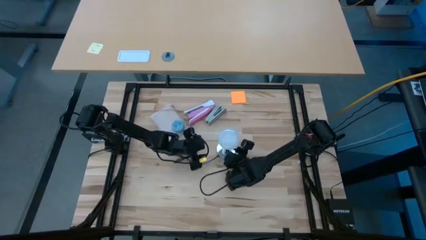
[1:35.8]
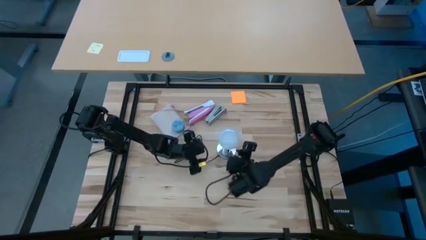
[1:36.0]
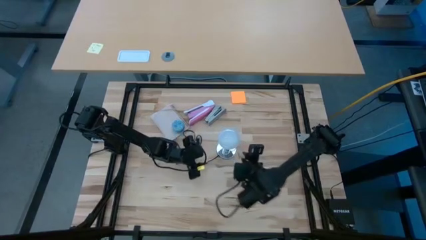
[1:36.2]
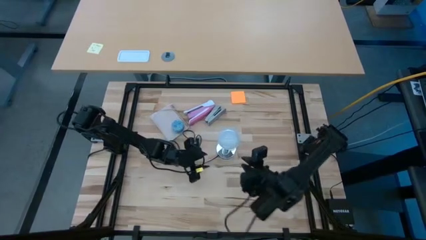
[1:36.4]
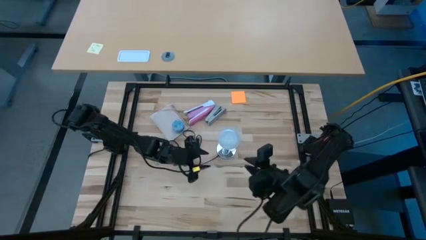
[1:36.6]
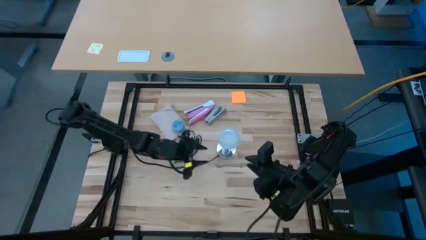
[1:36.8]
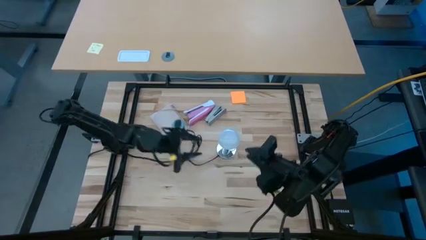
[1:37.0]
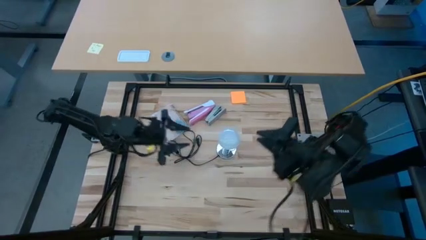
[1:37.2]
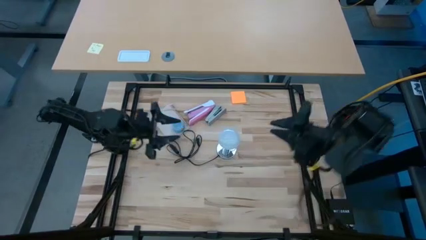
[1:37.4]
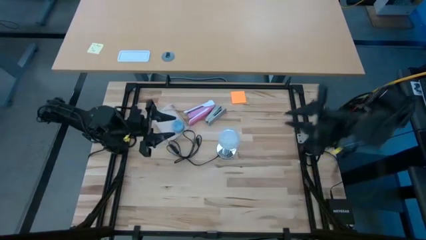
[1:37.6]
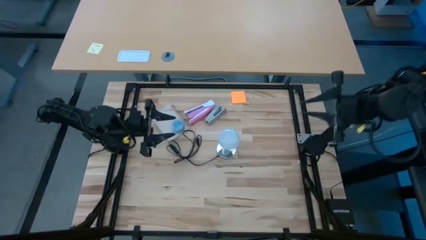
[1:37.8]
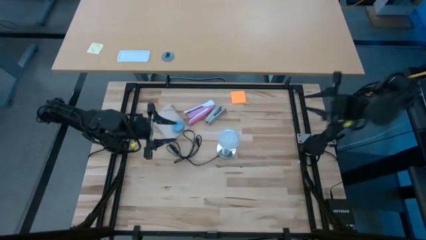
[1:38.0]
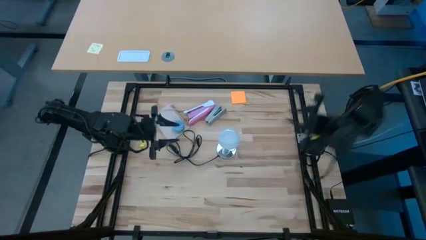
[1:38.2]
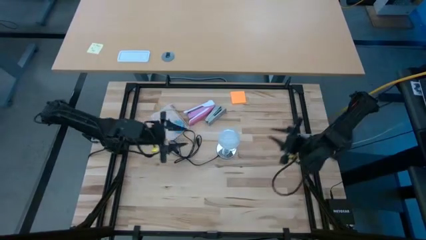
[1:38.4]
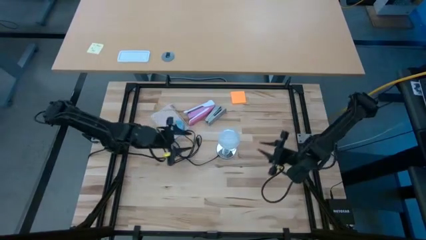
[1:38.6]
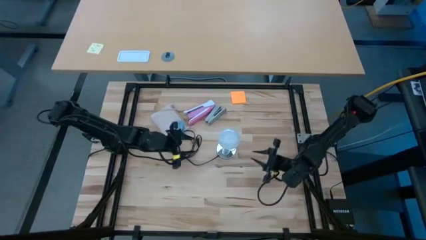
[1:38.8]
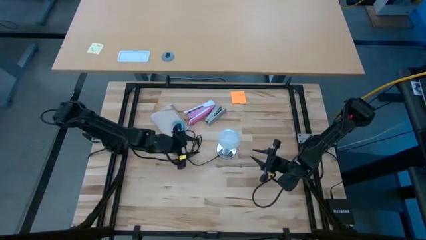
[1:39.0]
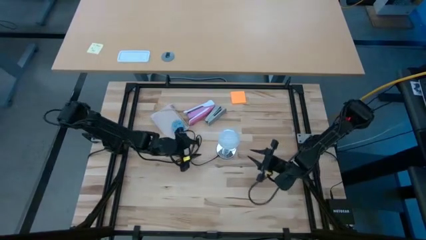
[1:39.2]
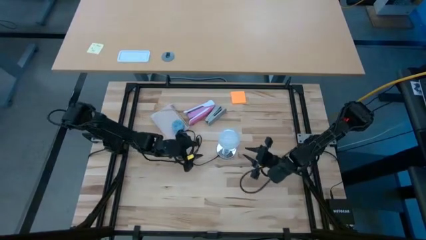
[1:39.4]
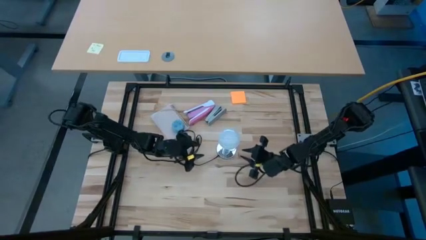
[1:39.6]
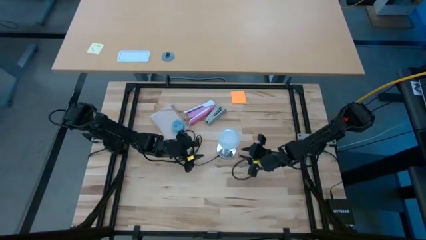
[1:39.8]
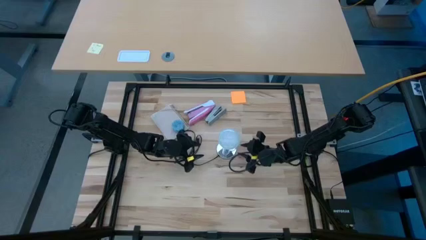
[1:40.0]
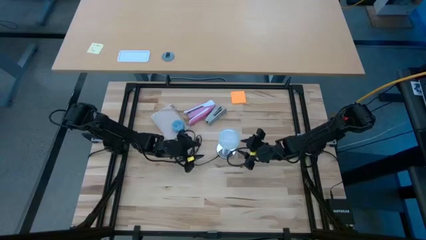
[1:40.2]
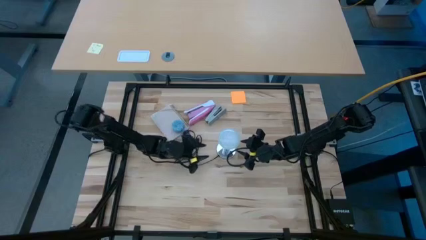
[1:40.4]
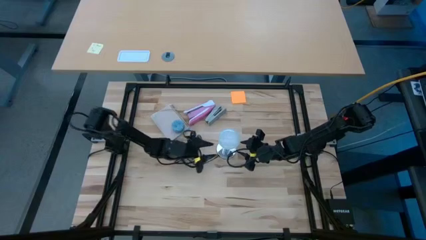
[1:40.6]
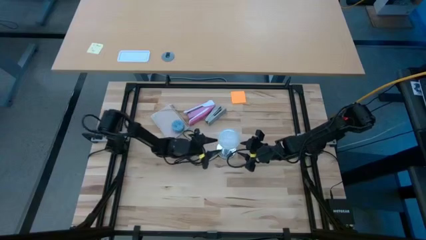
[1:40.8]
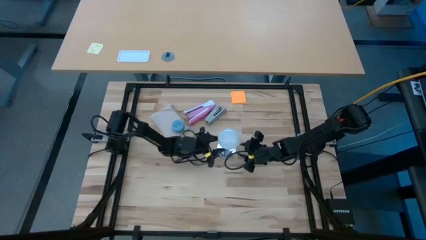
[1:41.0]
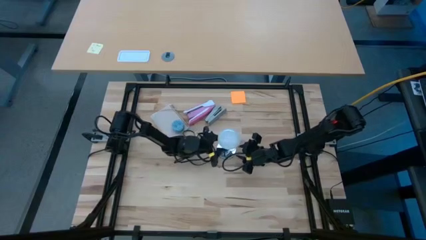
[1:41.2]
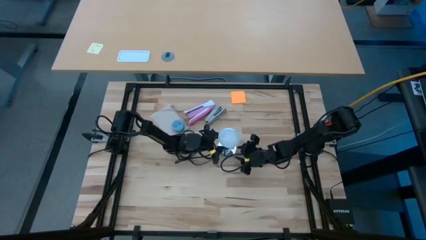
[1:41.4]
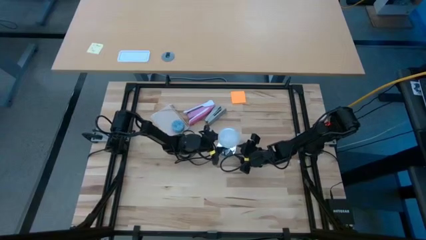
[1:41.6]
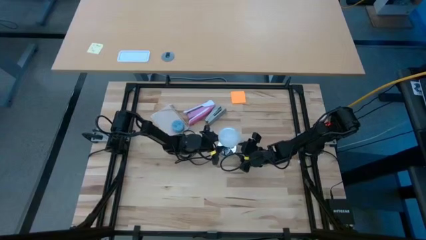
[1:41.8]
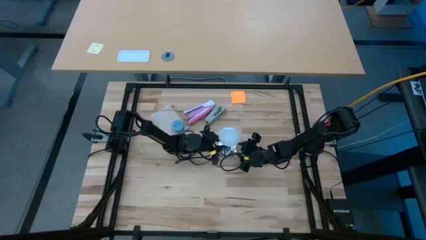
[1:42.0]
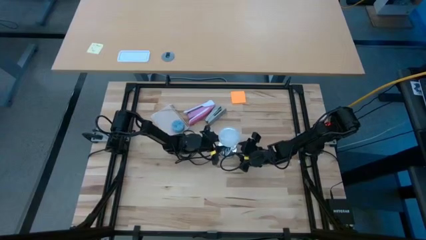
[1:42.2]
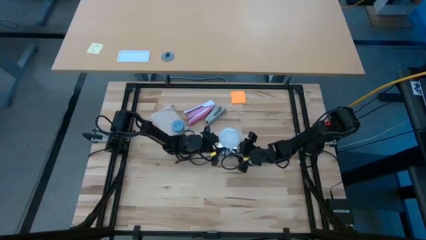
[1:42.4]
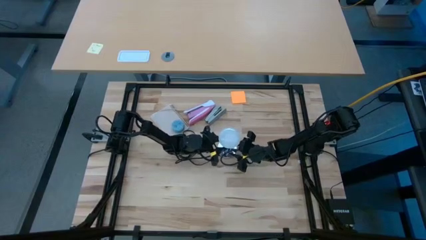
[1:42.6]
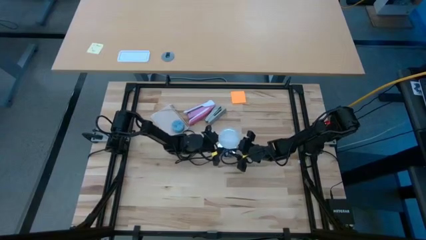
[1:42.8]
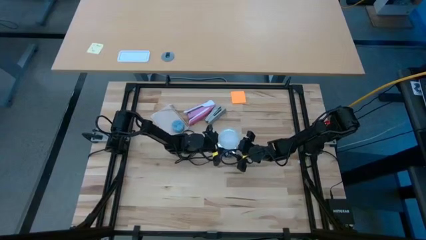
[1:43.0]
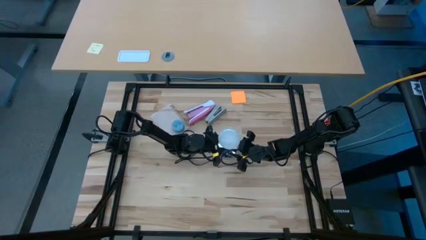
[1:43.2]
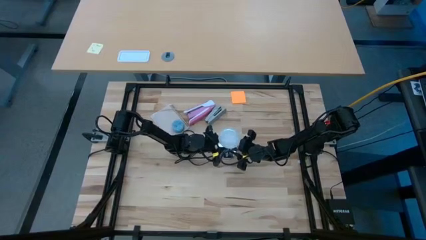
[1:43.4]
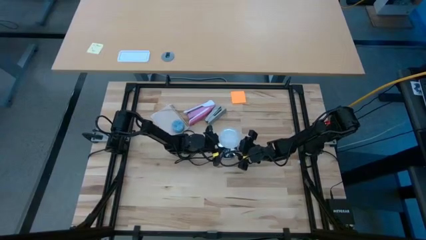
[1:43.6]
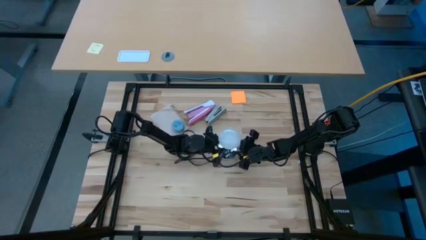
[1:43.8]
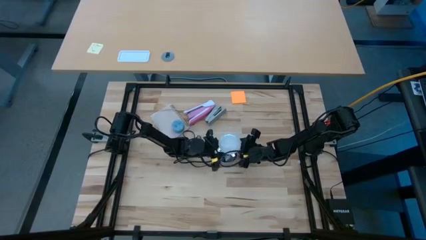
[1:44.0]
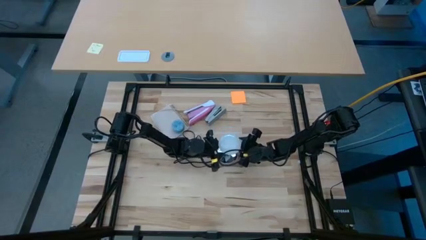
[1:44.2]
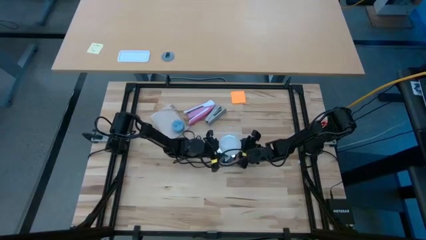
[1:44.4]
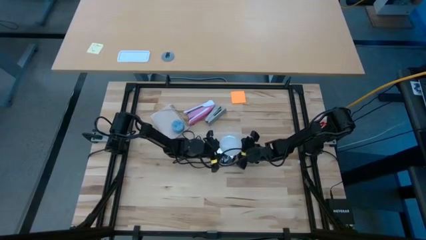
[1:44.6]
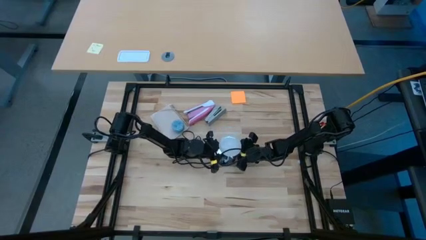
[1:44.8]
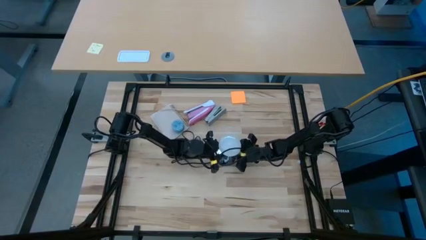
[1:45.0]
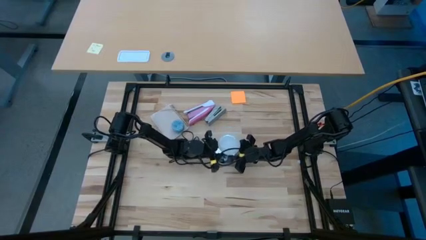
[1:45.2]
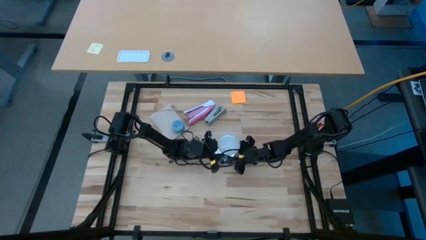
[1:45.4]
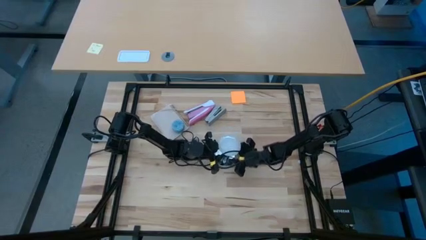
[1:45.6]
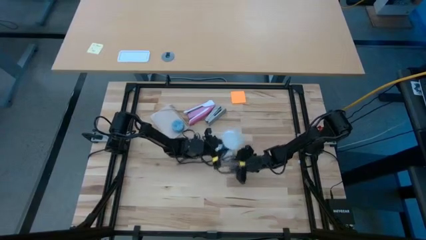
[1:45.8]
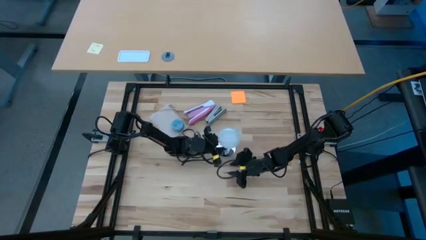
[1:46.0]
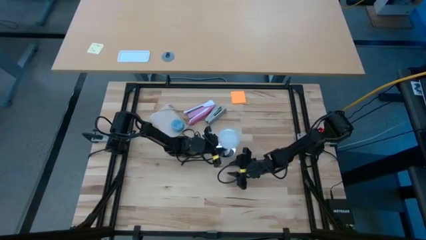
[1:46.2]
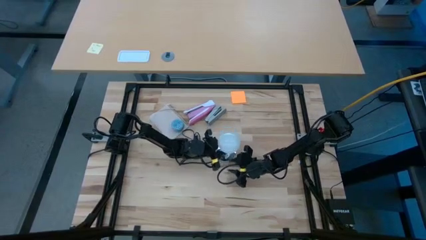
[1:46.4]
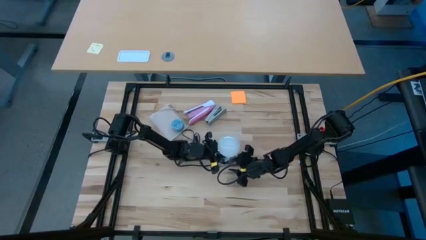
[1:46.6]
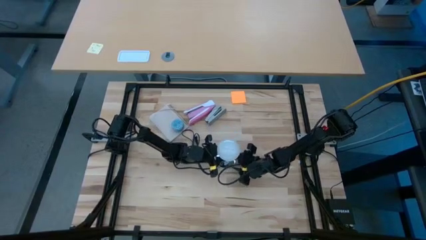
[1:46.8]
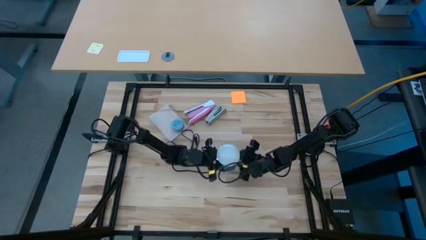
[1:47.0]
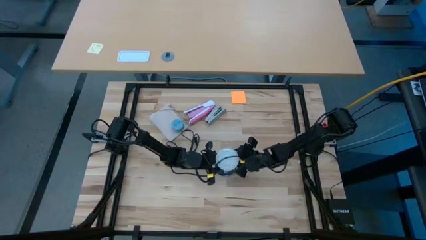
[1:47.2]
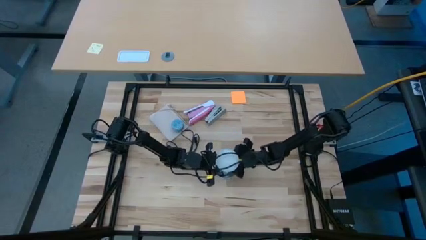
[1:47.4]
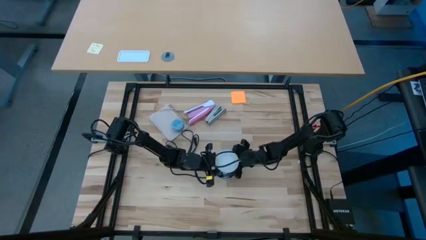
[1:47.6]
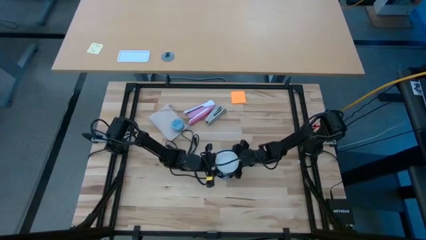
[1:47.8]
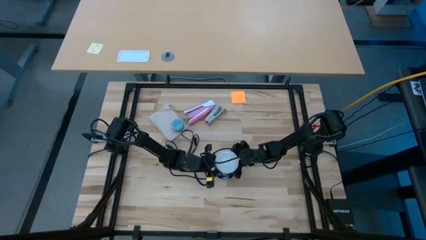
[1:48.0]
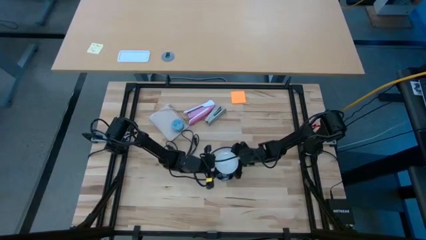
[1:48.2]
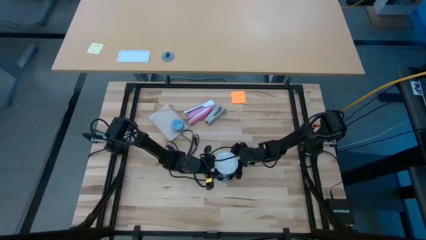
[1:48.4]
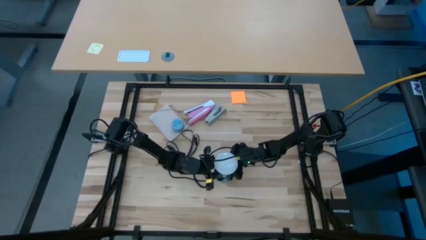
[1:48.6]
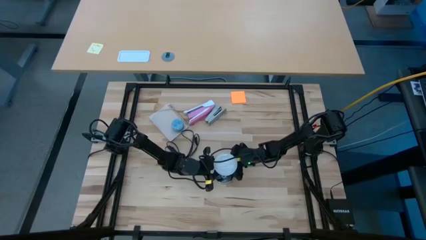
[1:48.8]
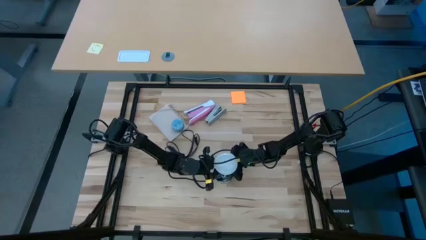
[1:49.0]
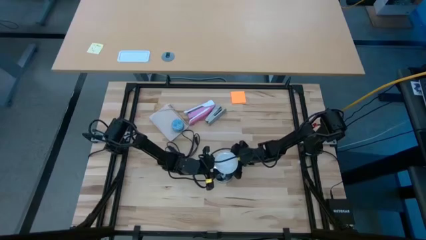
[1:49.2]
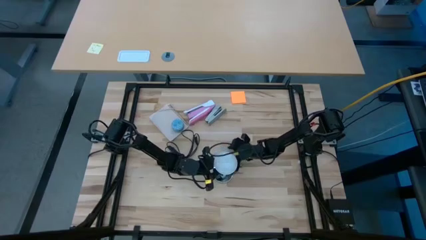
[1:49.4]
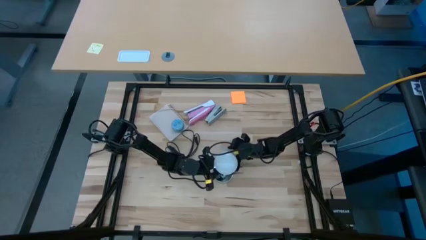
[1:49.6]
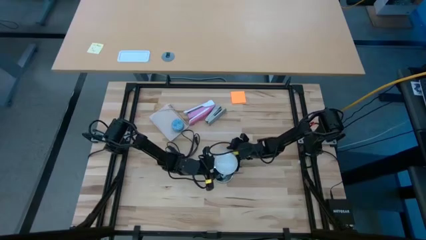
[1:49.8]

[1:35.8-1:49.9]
Task: Screw lightbulb
Remove the white lightbulb from the silver desk lamp

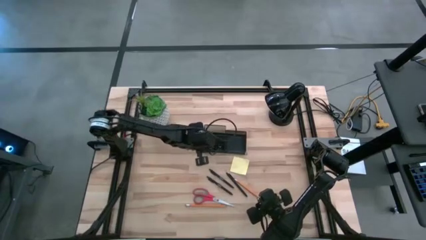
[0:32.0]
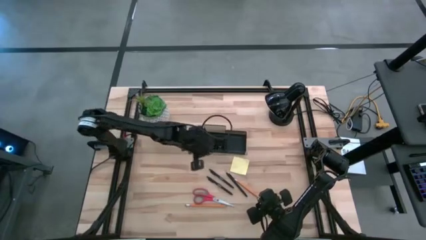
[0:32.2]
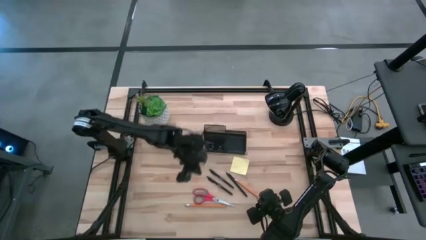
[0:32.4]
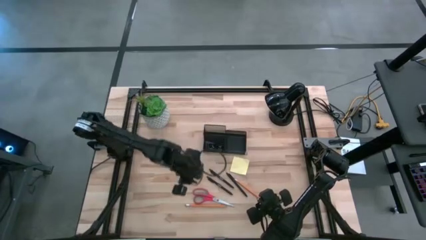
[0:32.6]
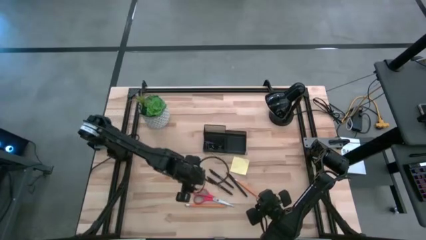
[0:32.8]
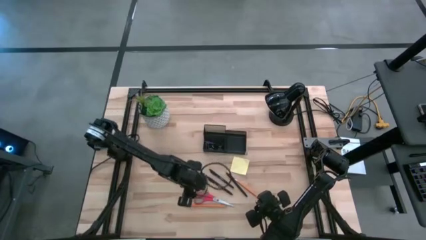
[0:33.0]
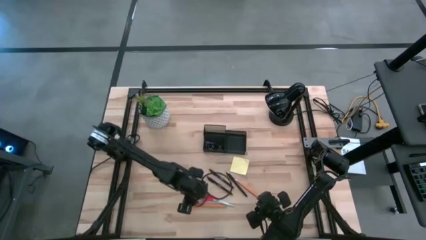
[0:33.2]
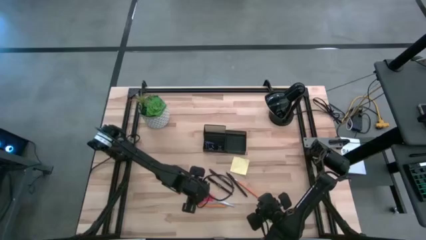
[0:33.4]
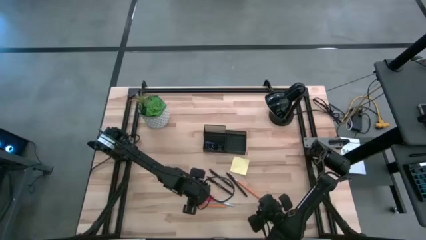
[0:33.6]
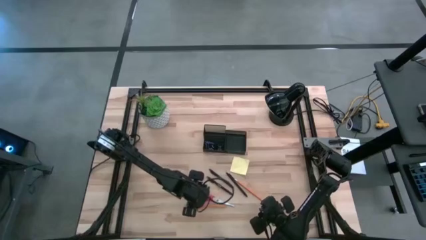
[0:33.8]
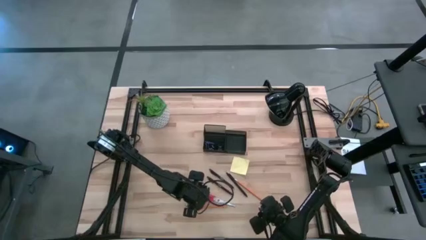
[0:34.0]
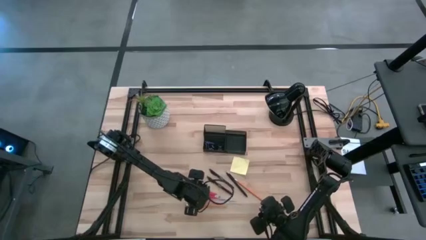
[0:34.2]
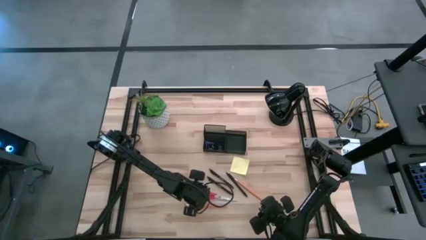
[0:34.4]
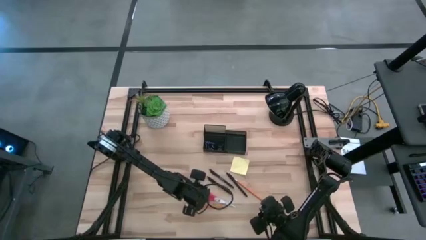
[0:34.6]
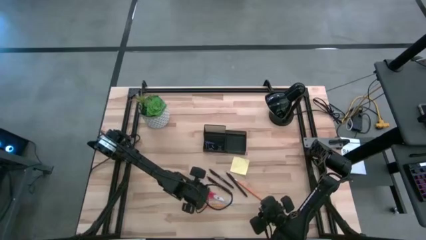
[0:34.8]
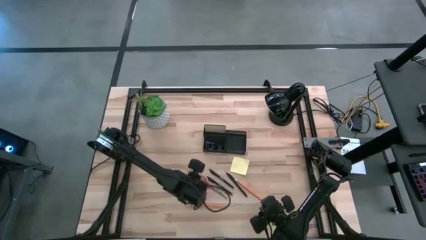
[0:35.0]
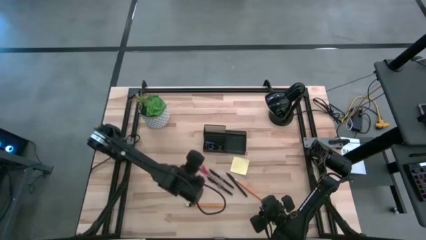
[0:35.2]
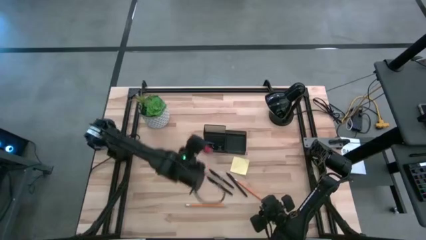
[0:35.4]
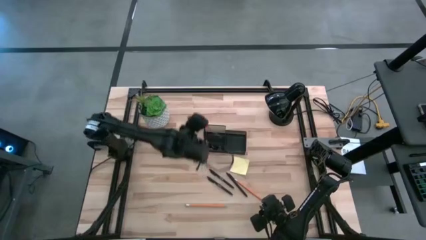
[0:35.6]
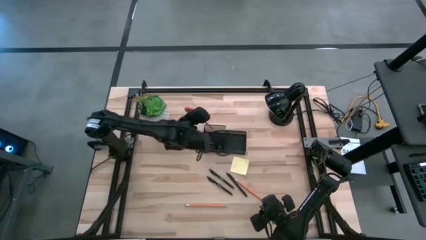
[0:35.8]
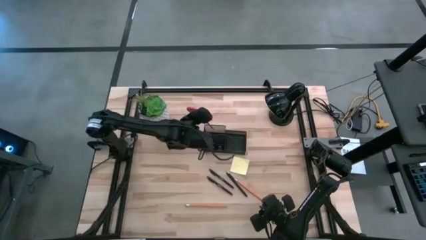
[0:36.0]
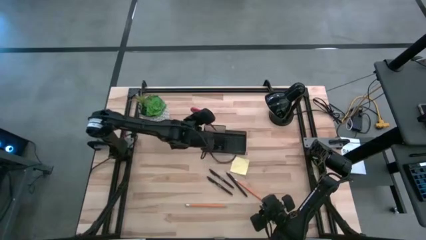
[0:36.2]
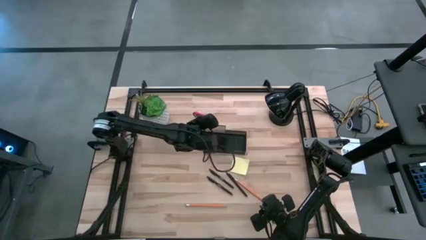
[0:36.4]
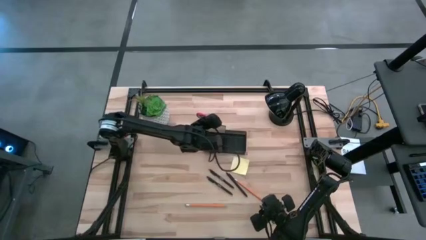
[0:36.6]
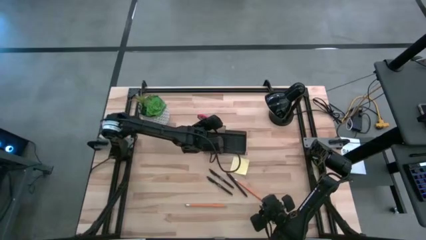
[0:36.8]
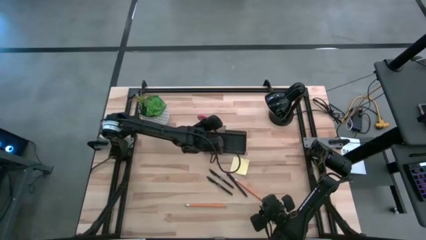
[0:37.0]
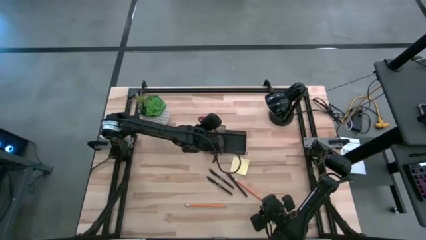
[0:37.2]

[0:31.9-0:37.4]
Task: Pick and place office supplies into organizer
Put the red scissors into the black desk organizer
